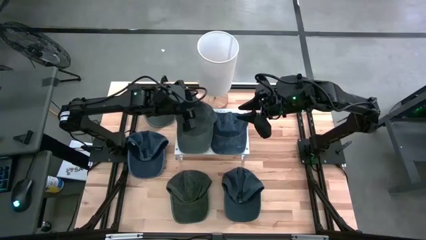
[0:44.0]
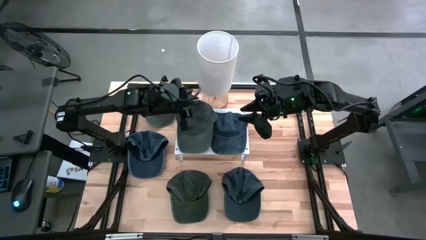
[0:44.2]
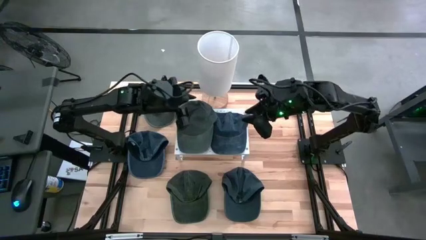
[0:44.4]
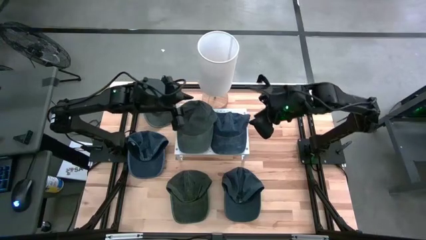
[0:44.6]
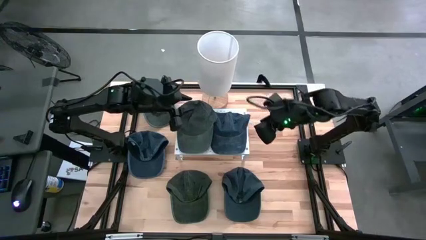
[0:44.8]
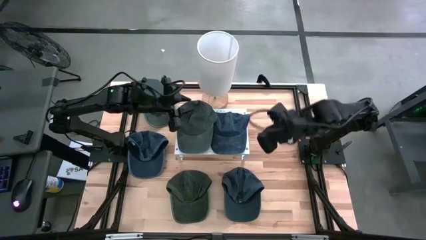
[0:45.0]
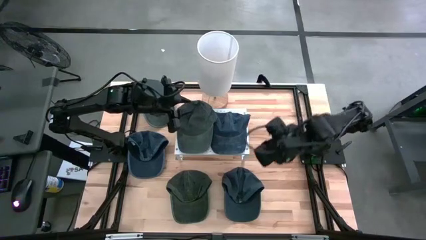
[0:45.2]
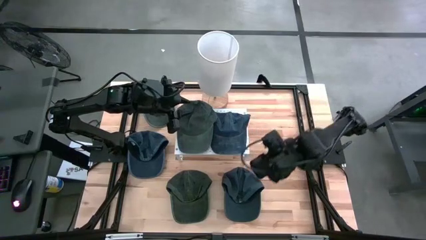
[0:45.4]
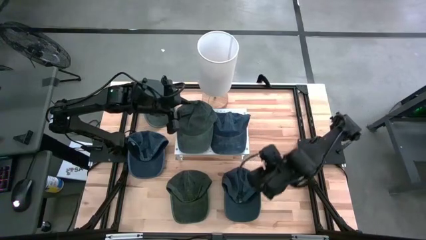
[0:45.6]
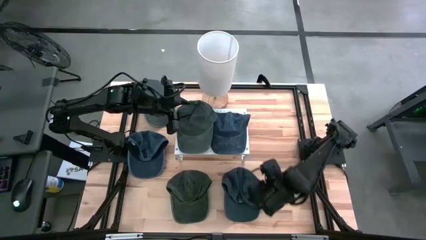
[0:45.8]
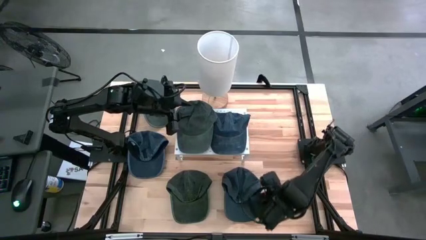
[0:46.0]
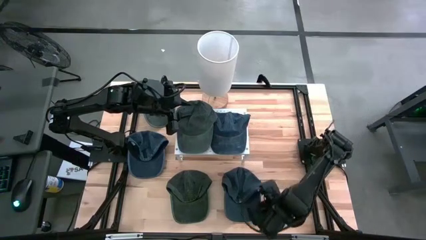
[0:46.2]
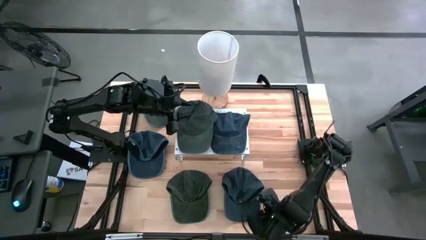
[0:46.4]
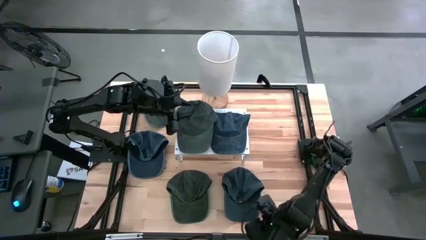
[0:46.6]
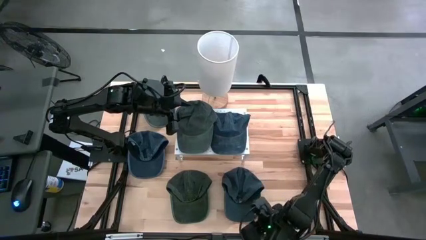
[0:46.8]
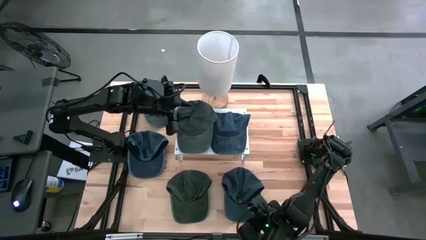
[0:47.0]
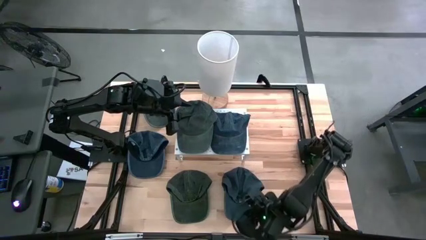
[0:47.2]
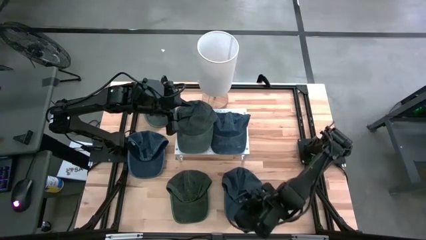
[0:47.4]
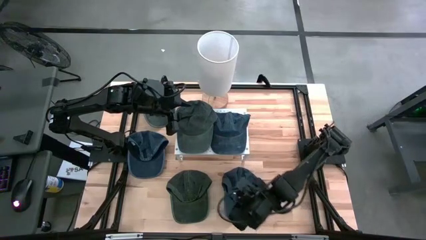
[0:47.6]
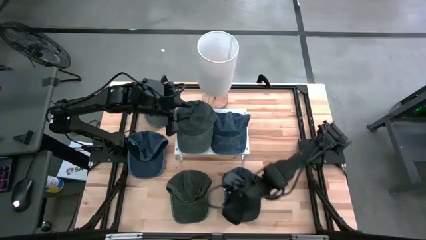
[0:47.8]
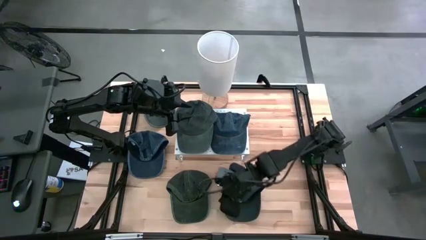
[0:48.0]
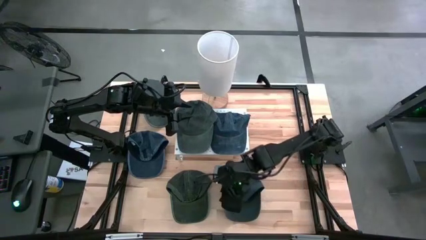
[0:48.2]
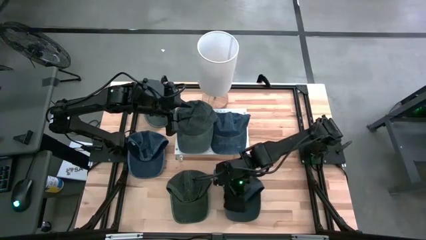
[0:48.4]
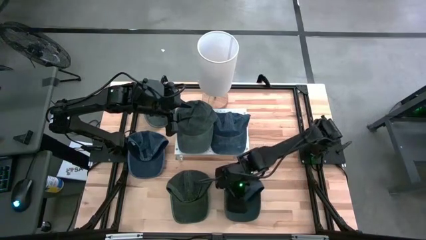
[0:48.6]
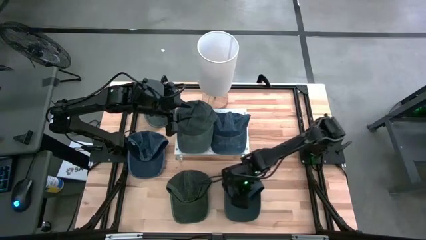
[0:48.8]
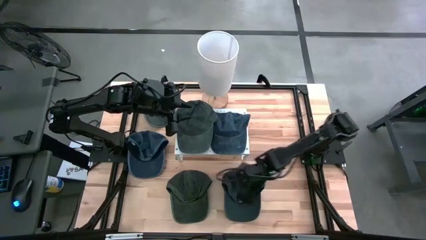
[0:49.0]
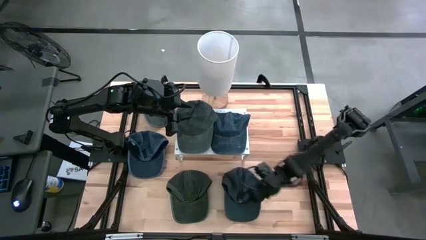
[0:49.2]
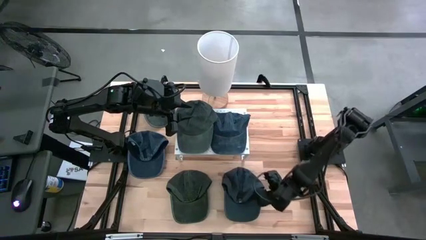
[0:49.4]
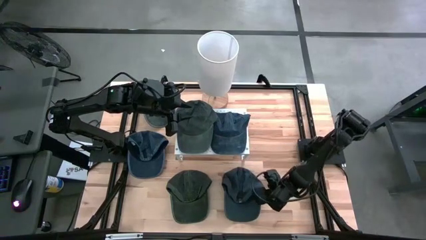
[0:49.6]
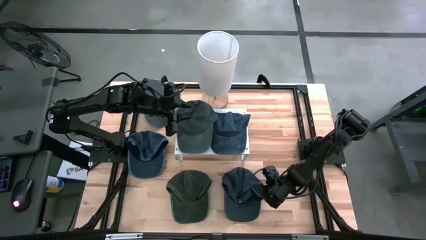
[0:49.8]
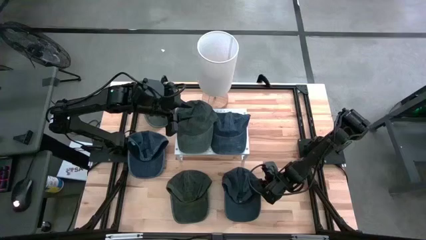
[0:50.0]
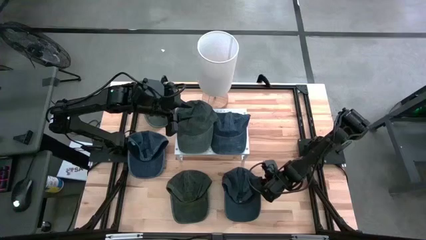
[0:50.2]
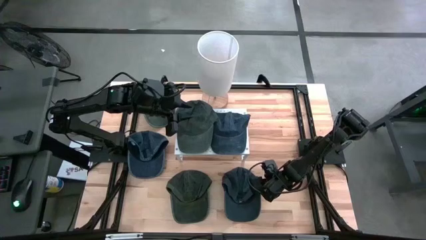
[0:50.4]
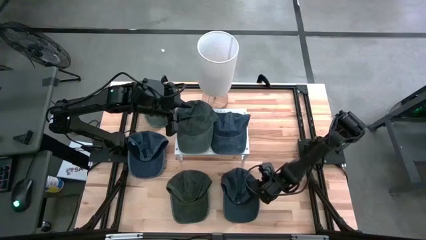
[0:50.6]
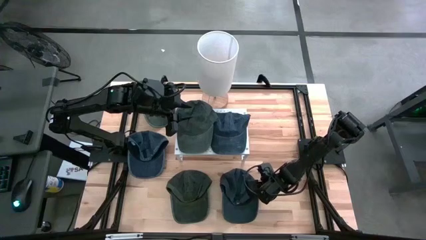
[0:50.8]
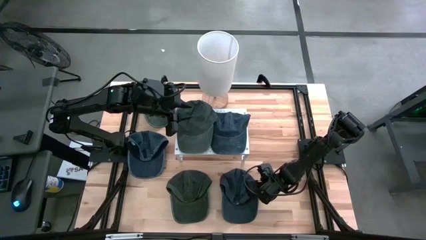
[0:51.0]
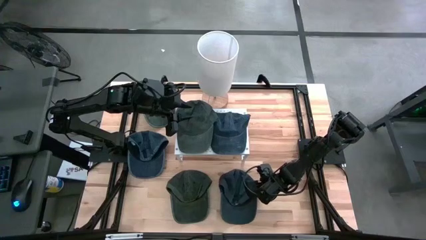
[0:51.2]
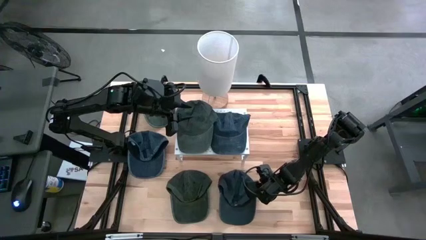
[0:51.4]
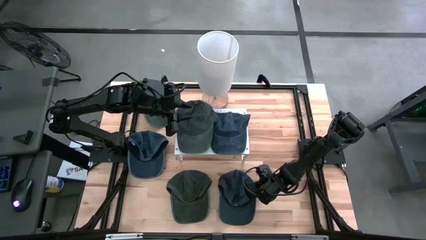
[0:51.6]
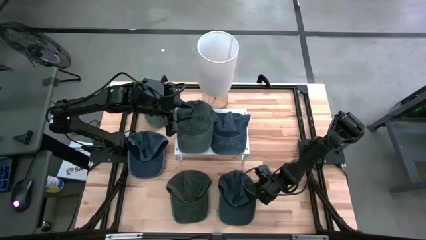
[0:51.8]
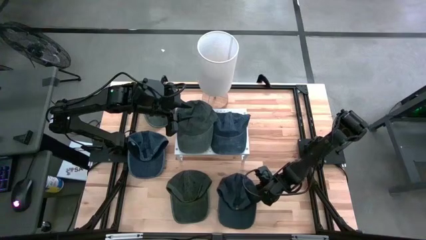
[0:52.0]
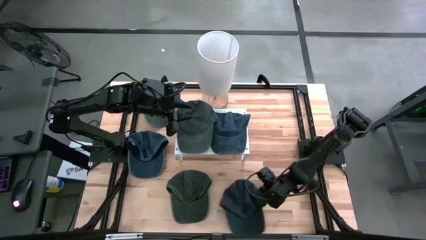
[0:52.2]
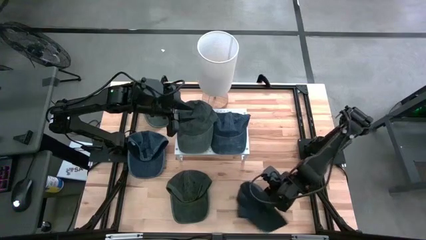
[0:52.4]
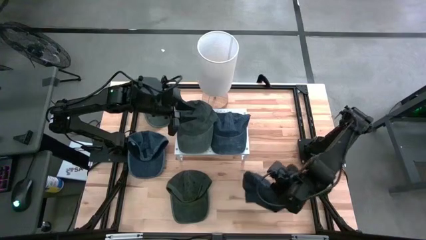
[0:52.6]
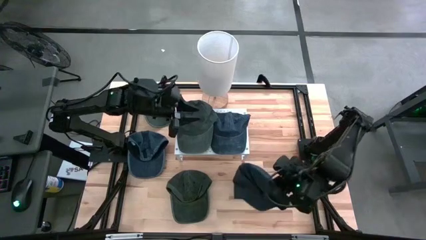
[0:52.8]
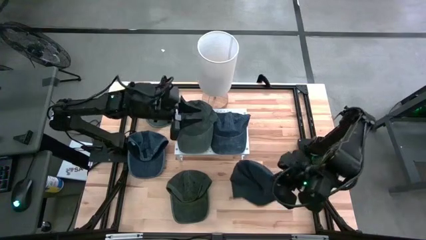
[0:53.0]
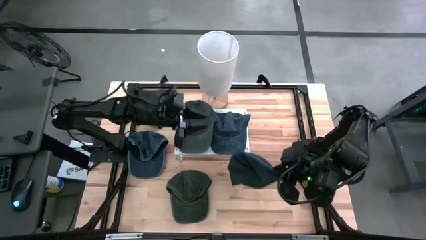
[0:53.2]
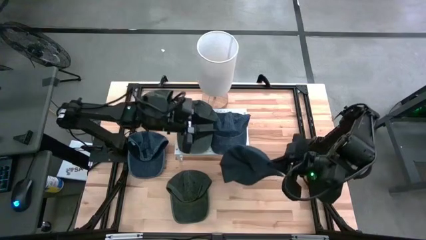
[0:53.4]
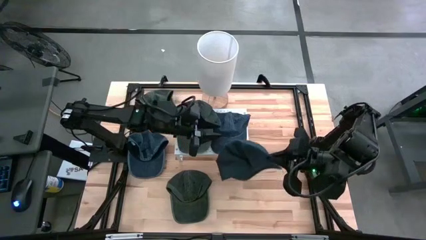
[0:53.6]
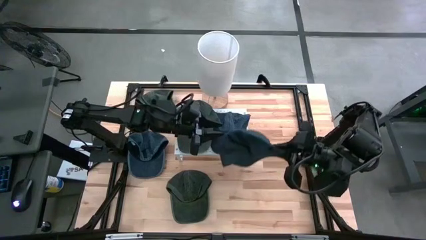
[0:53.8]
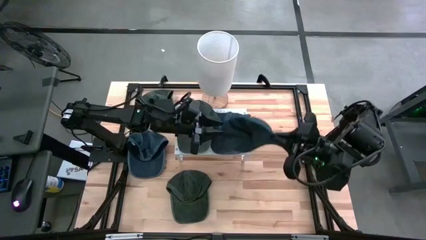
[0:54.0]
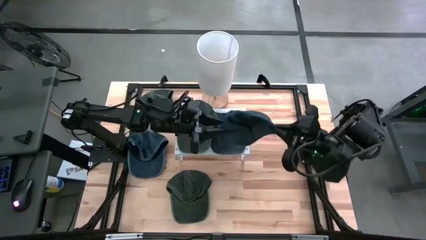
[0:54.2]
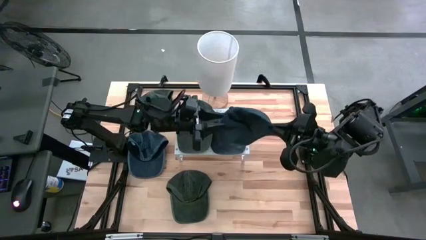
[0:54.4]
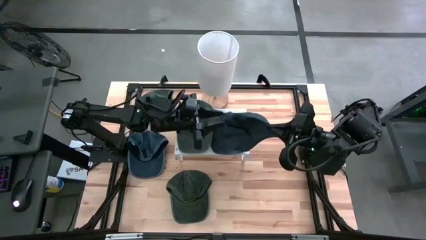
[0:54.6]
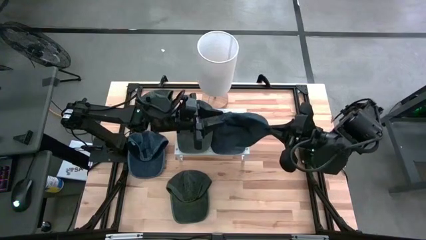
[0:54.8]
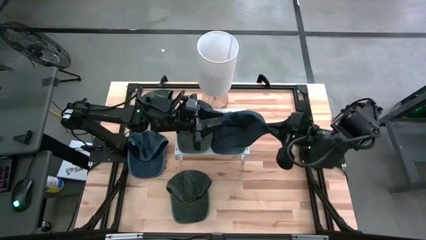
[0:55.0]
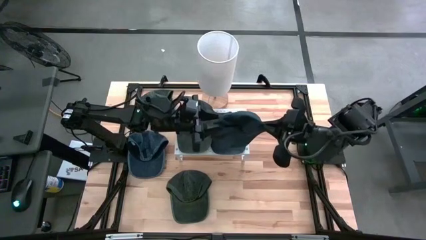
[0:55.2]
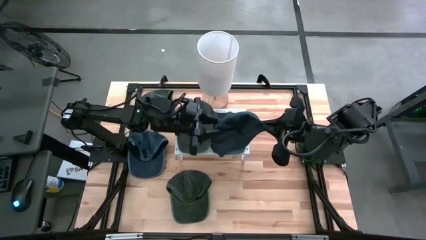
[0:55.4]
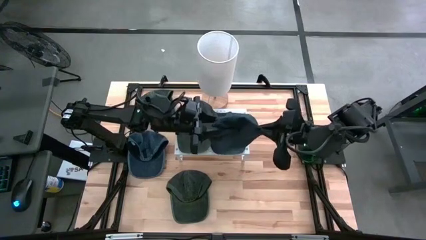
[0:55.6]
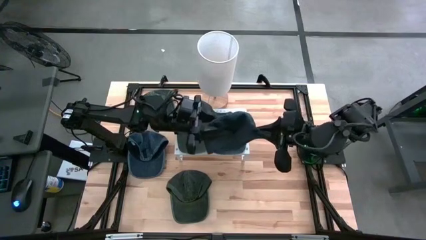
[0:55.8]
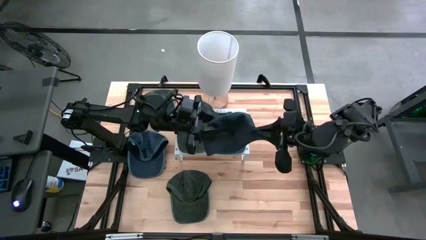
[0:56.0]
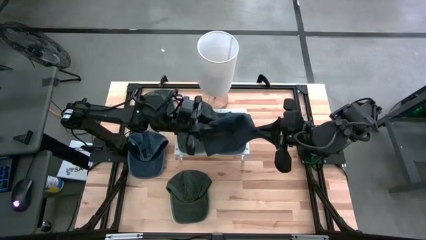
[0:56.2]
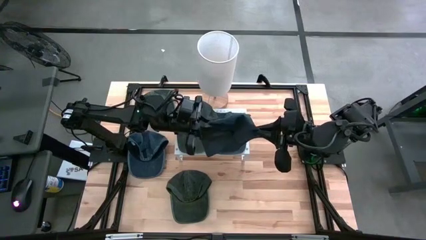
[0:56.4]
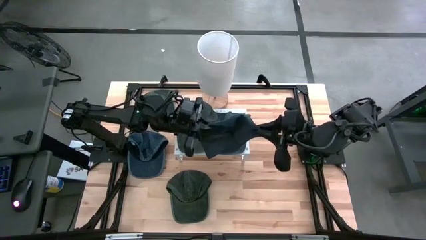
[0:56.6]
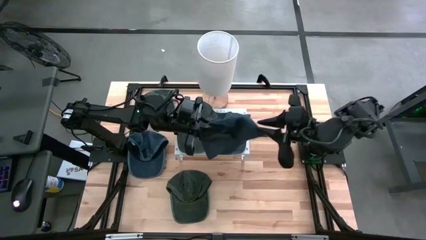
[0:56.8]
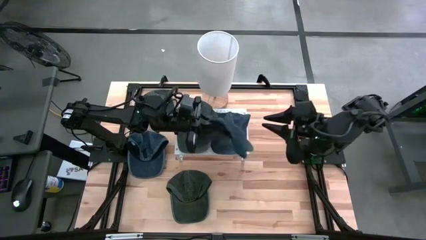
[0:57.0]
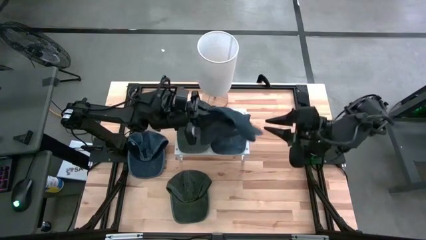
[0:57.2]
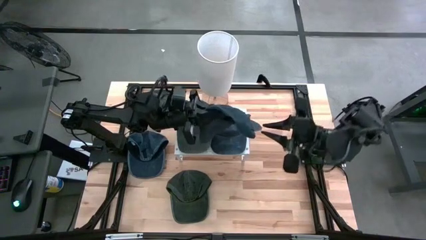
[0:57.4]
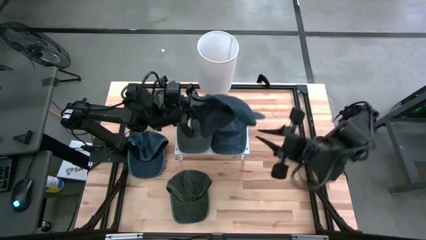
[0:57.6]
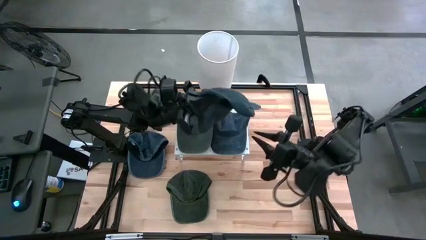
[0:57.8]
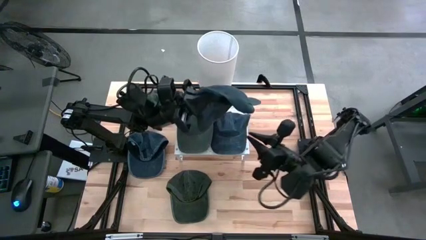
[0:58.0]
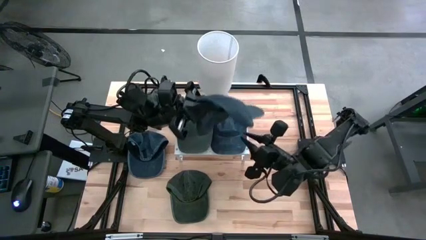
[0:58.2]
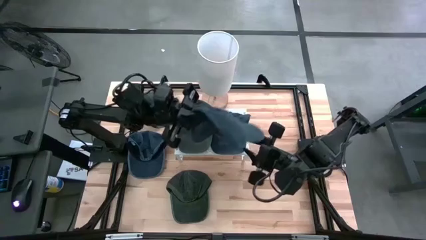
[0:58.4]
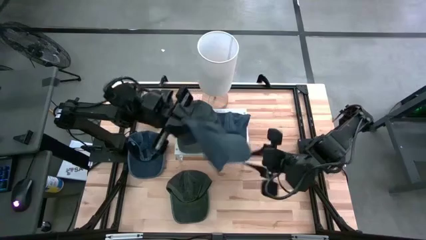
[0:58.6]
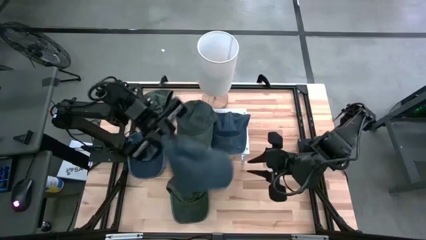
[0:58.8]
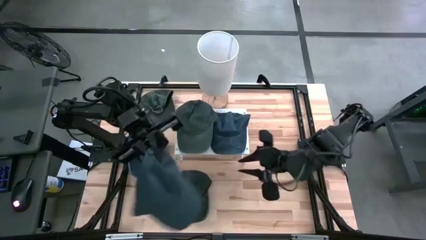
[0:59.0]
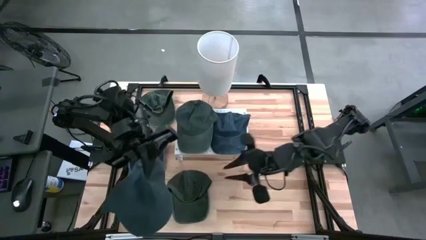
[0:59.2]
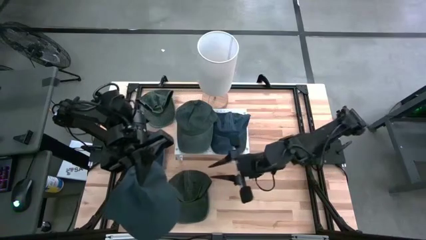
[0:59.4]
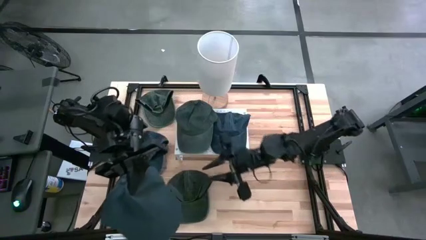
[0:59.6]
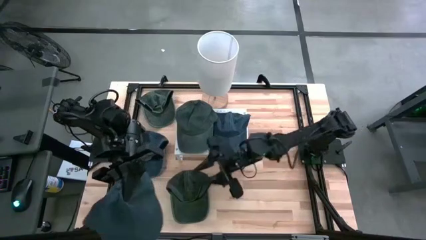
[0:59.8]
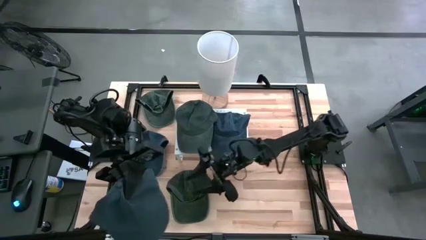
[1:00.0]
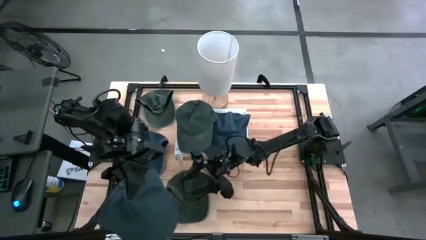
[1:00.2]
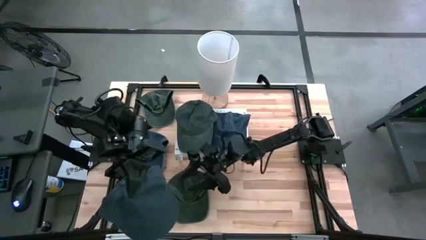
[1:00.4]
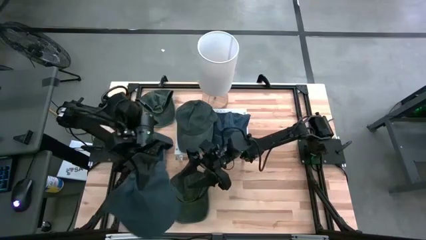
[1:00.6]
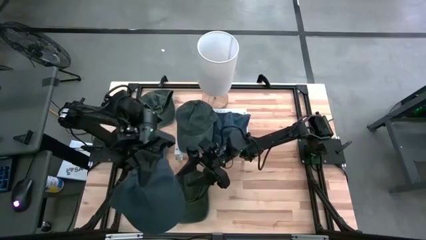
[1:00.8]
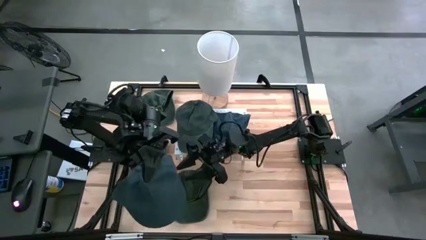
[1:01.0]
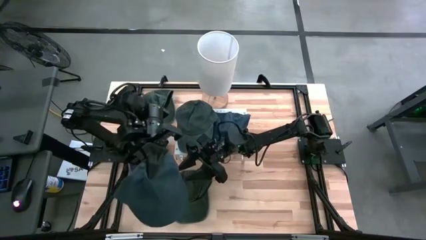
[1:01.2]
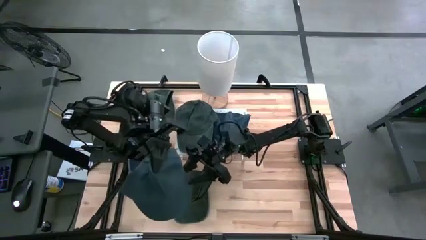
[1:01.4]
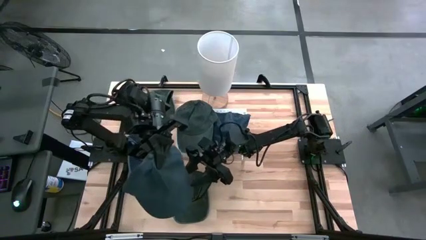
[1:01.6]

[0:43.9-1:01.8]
Task: Pick & Place hat
Stack the bottom blue cap on the blue cap on the shelf
